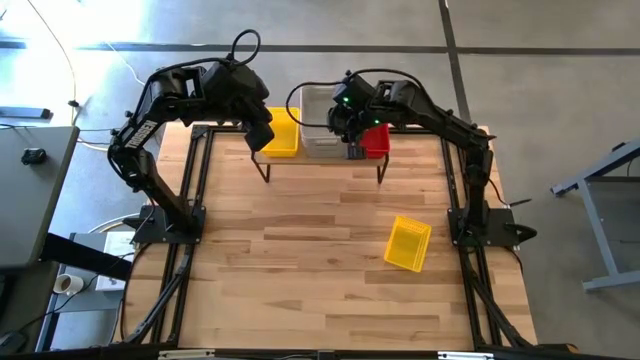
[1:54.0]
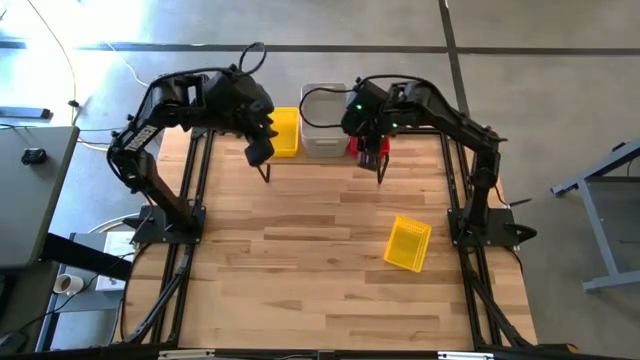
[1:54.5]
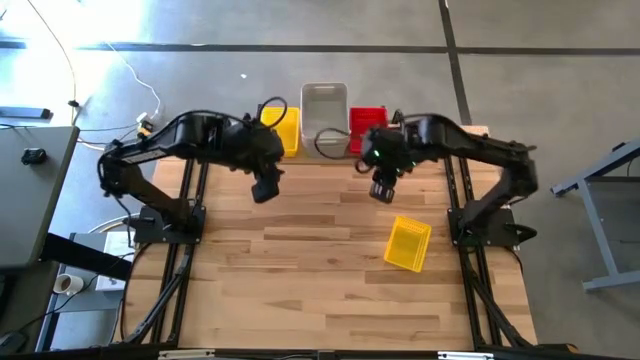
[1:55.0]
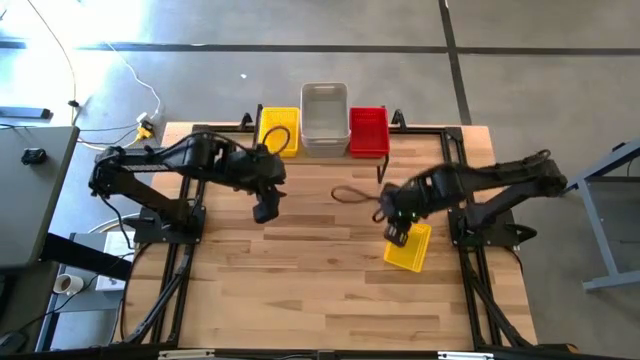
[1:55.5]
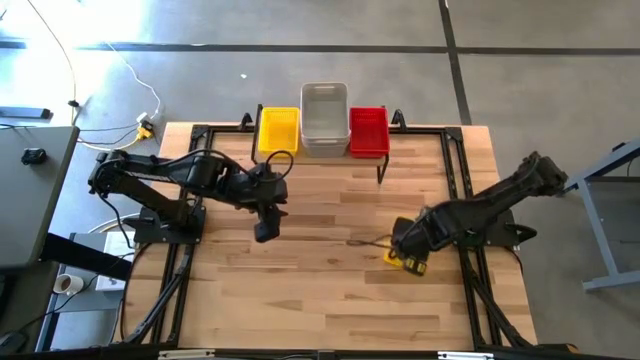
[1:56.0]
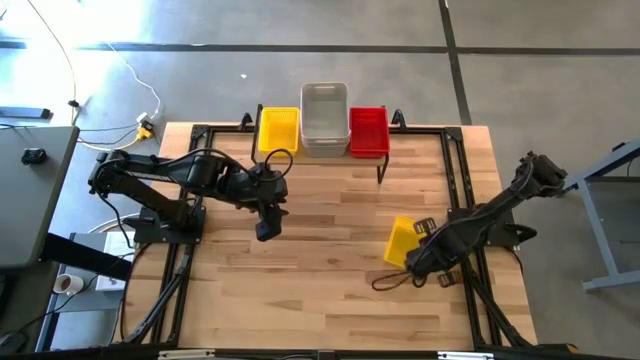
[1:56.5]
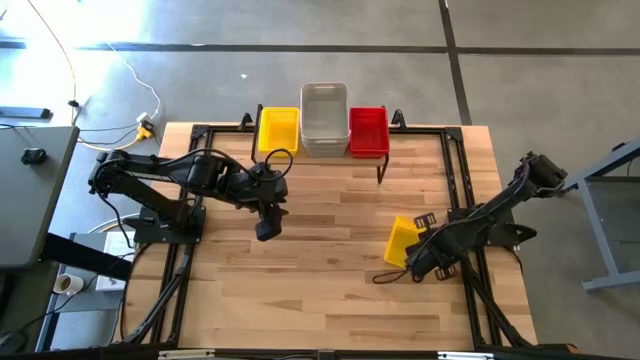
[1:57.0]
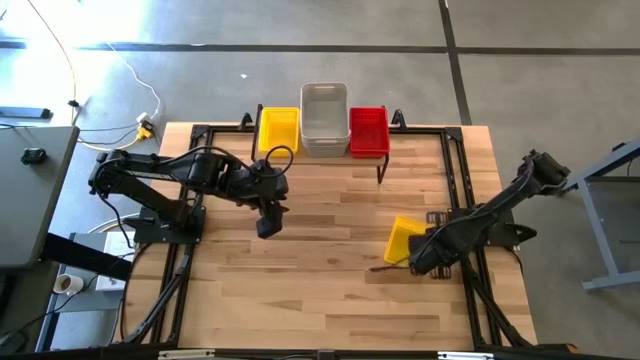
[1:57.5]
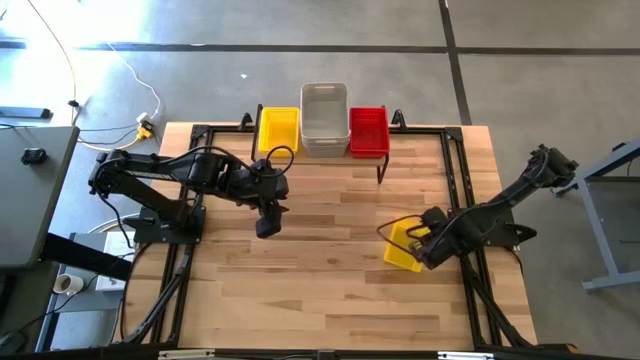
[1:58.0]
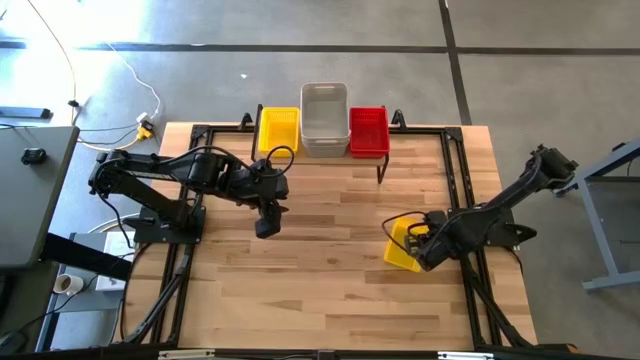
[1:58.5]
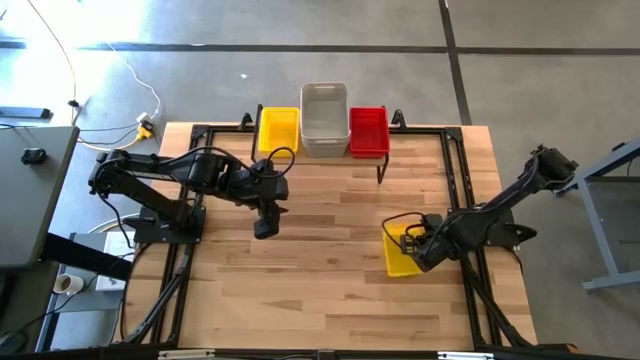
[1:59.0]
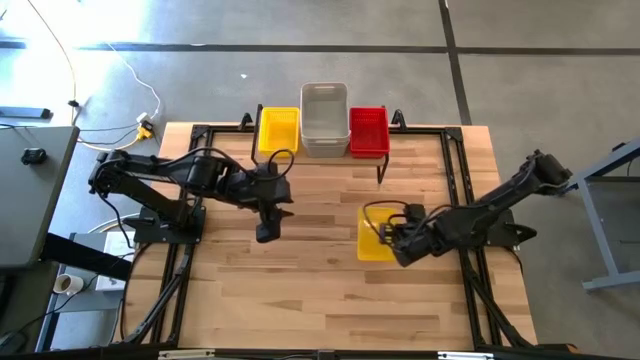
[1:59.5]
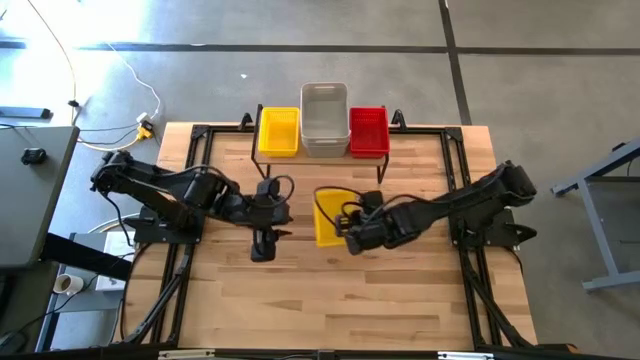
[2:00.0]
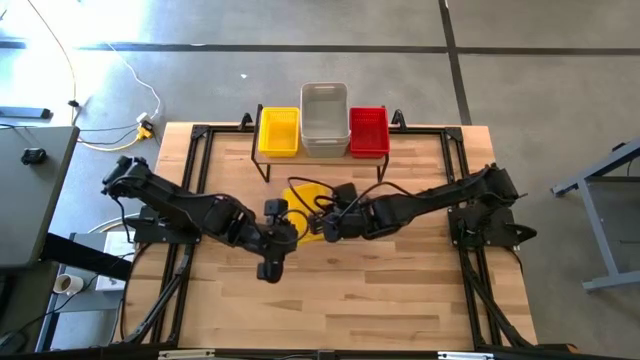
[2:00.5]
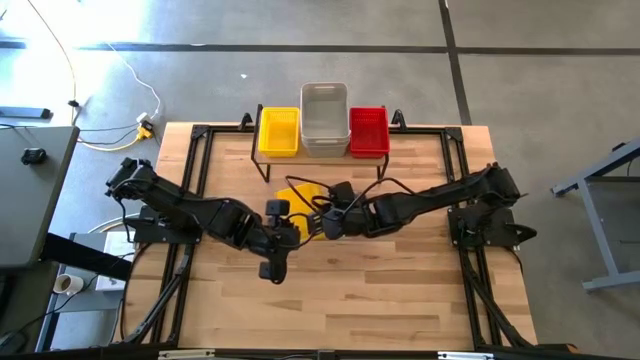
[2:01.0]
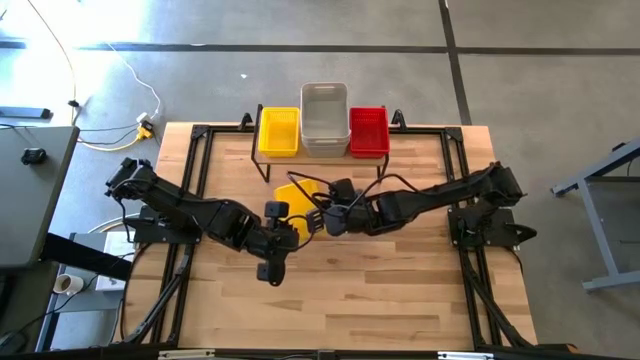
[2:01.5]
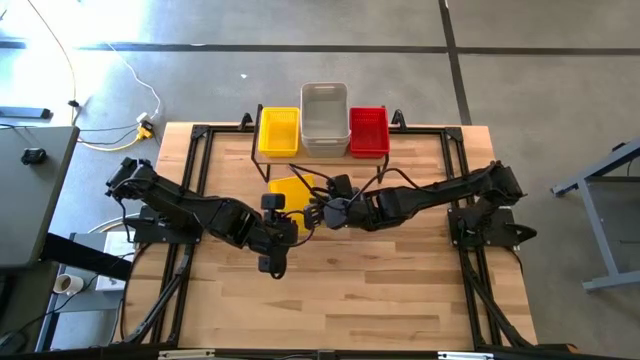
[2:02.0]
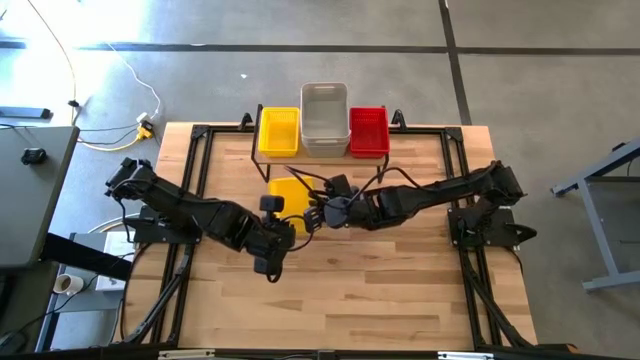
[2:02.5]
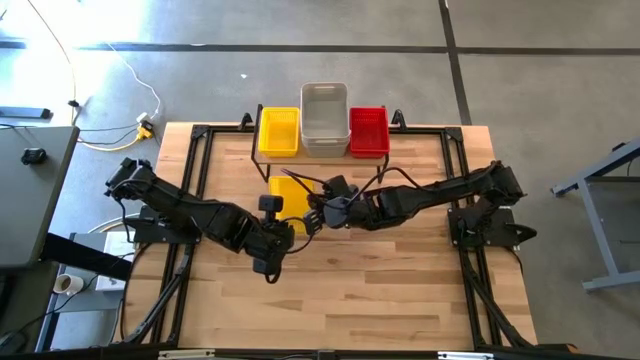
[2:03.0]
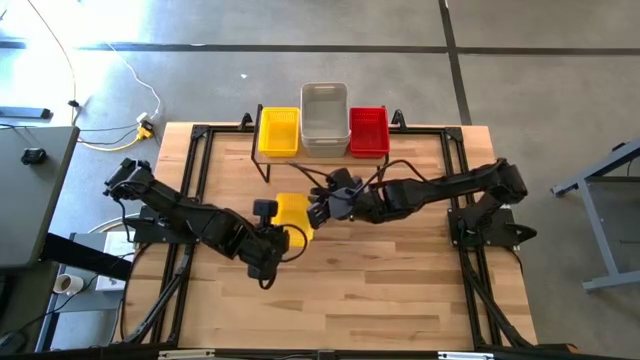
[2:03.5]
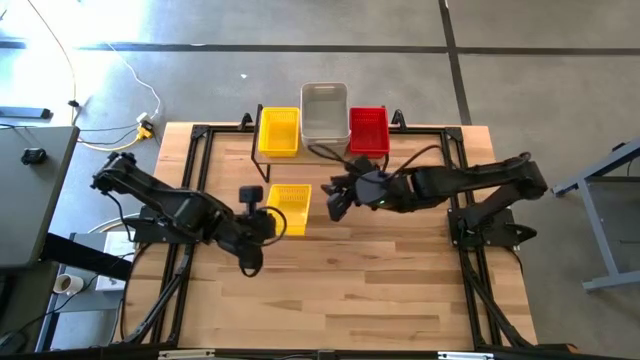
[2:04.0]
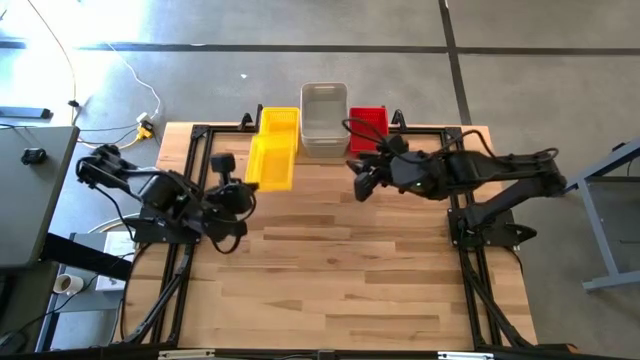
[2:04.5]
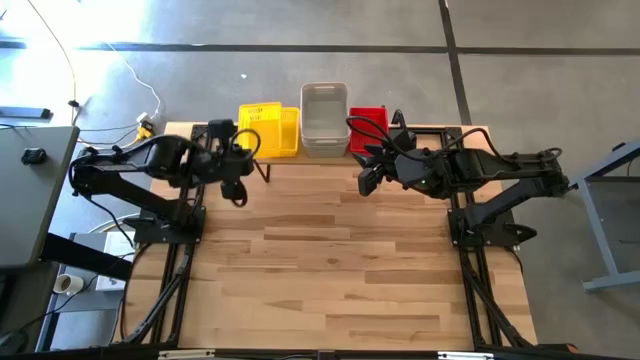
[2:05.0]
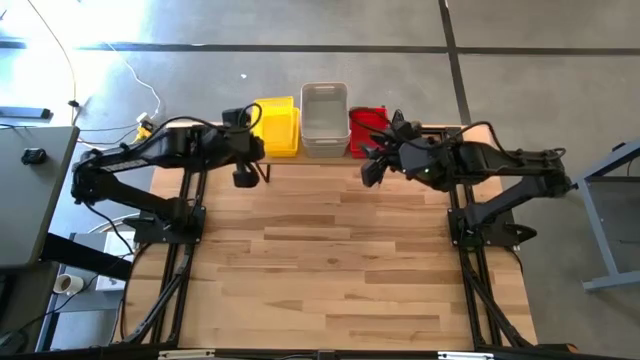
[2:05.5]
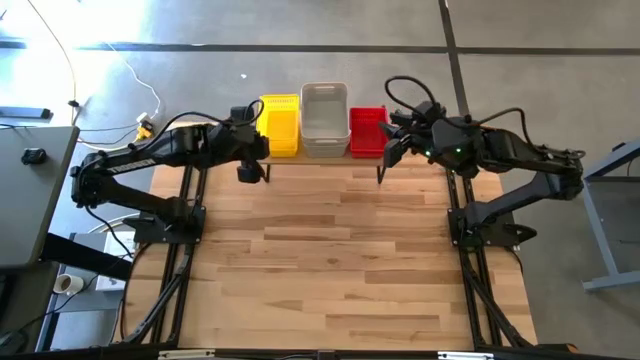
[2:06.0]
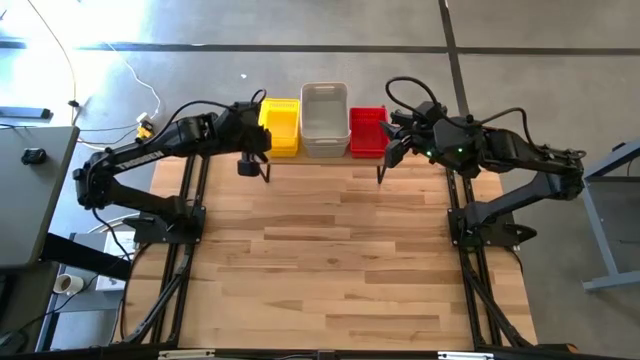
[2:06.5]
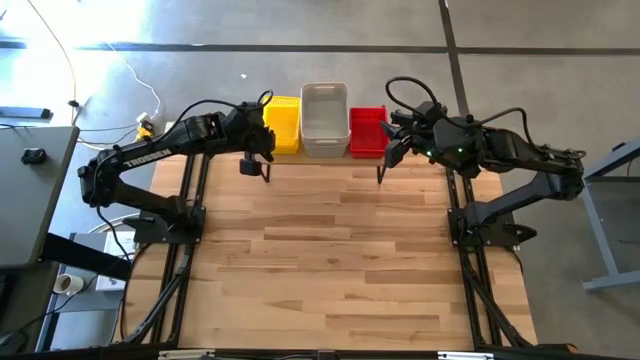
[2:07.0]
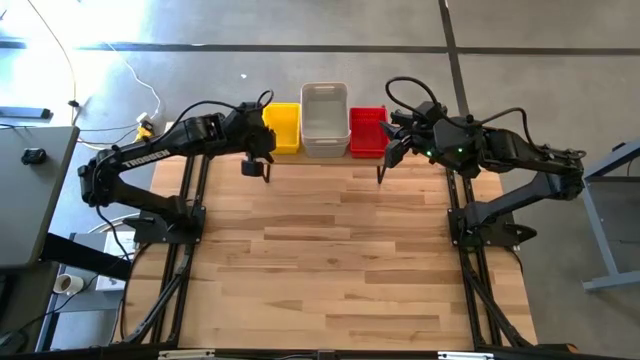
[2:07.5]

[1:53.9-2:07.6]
Task: Stack baskets on shelf by color
Stack the yellow bin on top of the yellow bins on the shelf

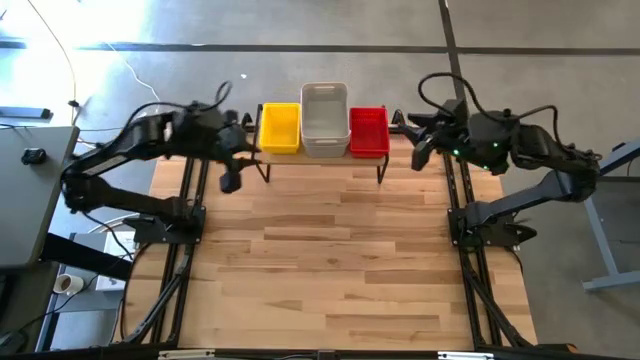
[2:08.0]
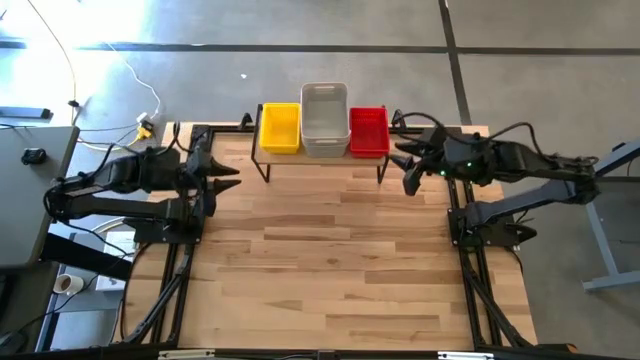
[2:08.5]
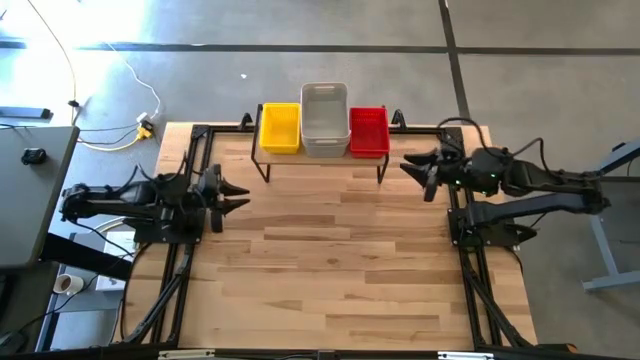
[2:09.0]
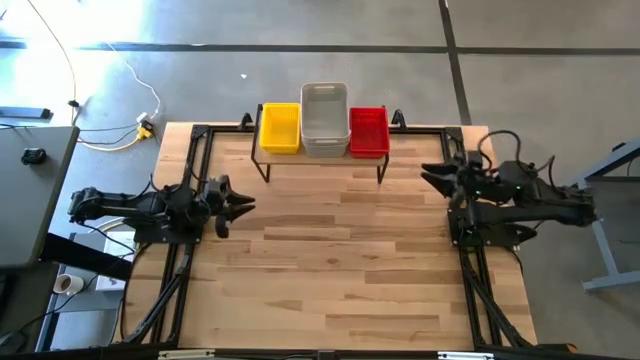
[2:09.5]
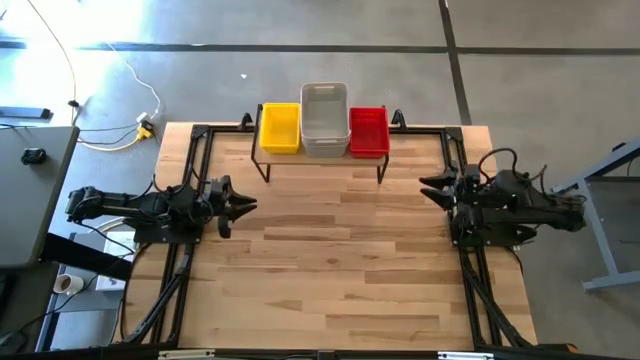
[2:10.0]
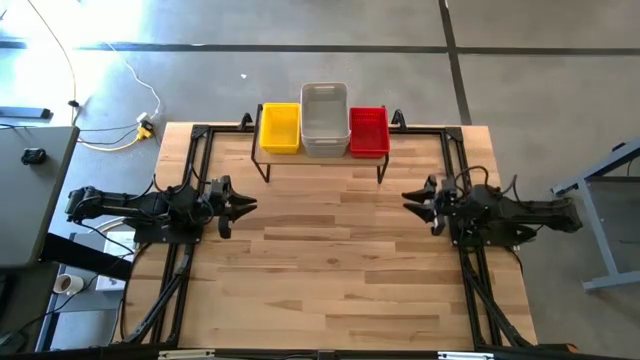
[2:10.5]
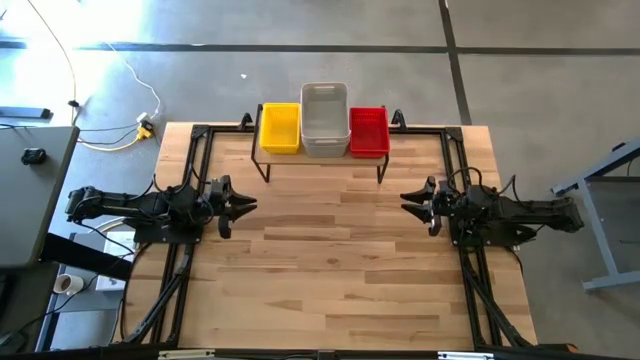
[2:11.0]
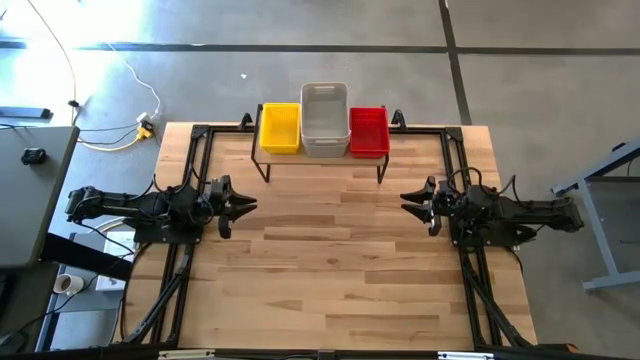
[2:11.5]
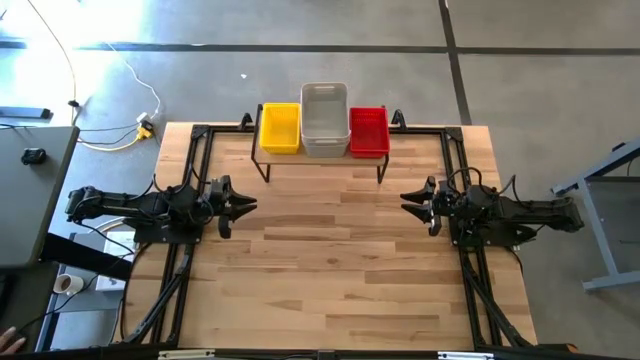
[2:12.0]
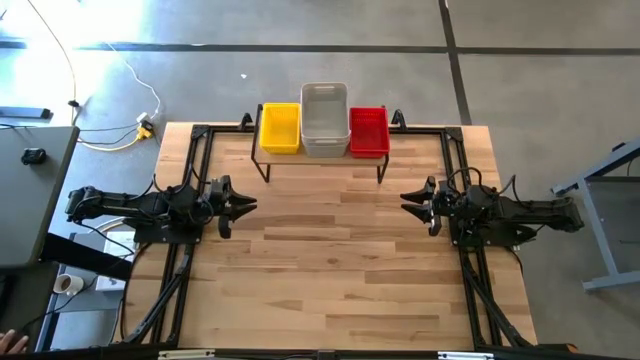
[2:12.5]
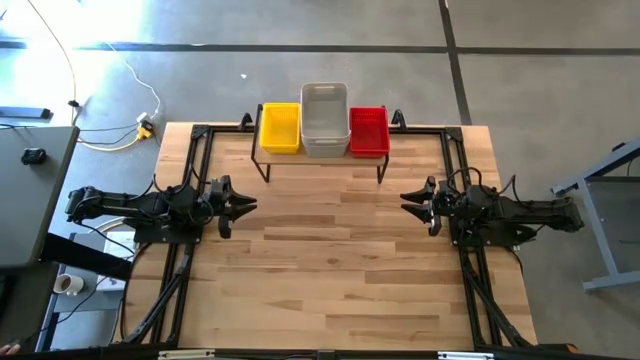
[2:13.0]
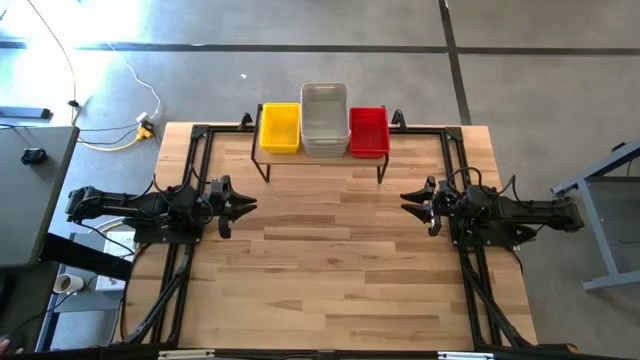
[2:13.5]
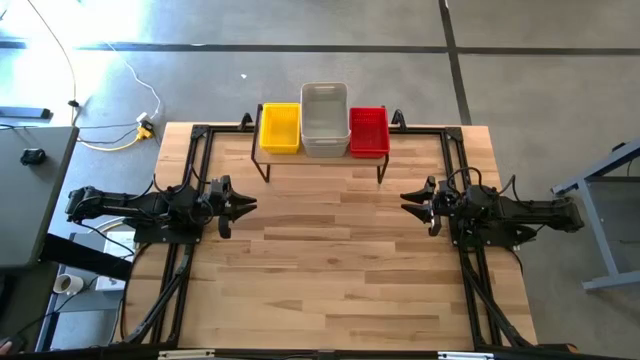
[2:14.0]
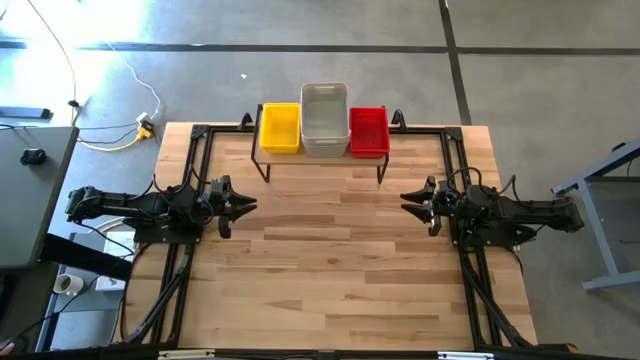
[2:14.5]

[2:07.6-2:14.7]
Return to Home Position

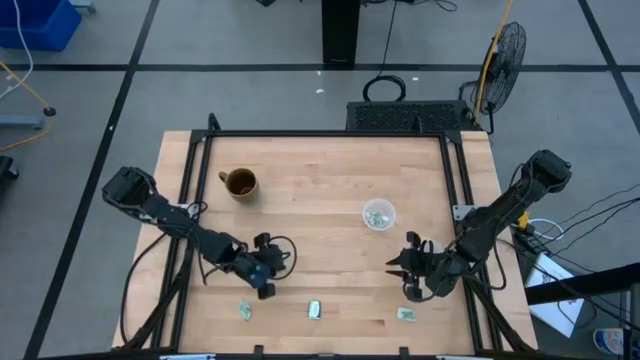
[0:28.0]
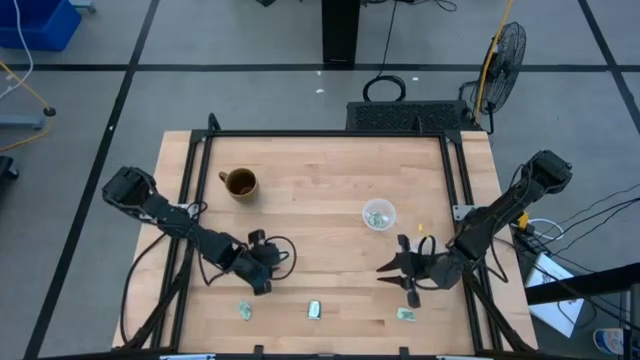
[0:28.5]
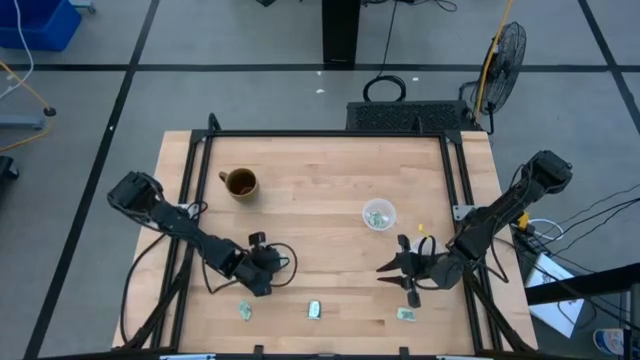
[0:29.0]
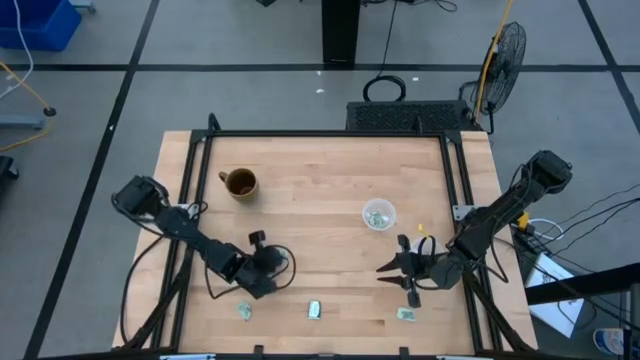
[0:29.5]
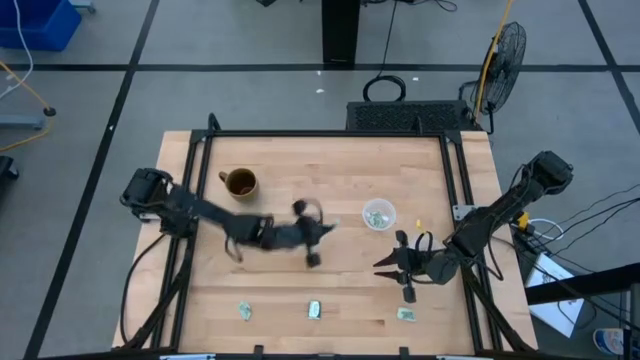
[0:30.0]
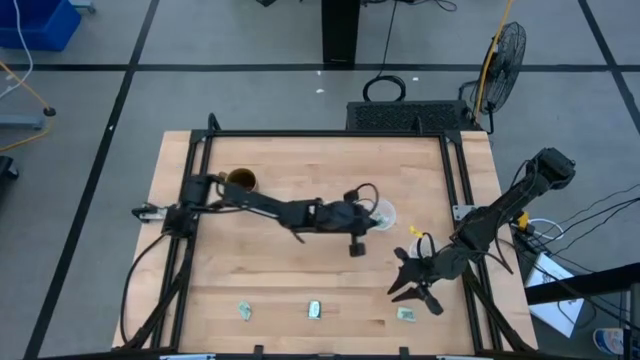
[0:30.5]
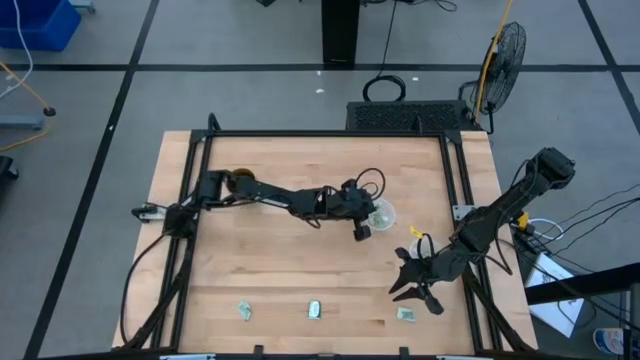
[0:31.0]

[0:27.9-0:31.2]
Task: Pick and place items into bin
Put the white stevia packet into the top transparent bin
